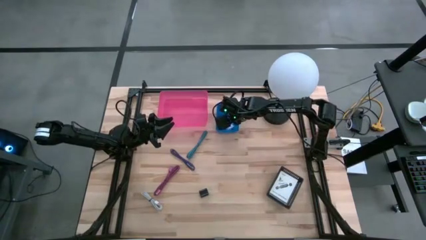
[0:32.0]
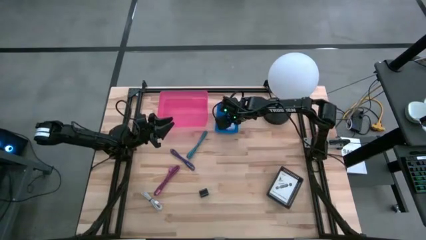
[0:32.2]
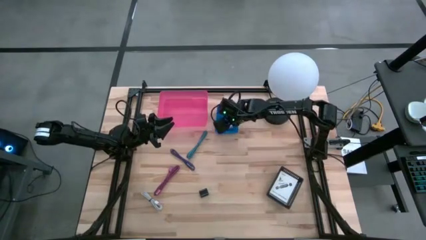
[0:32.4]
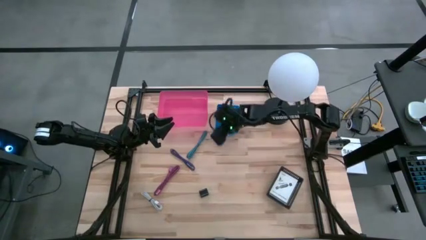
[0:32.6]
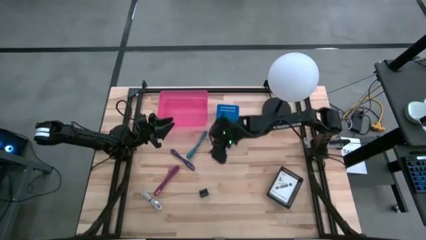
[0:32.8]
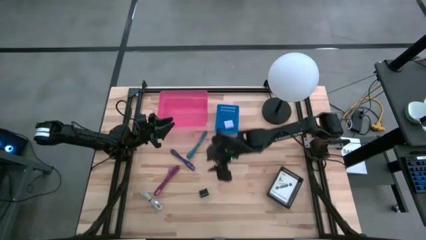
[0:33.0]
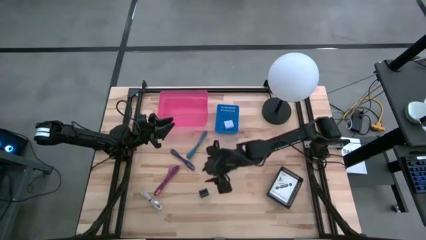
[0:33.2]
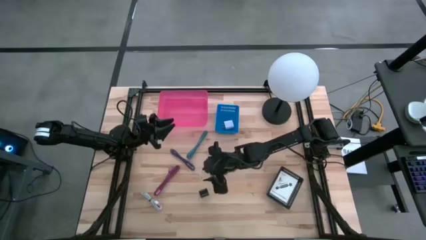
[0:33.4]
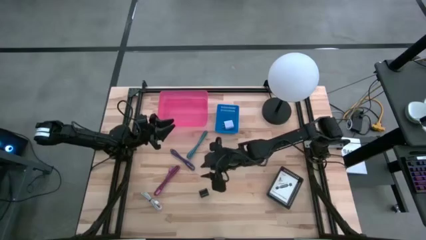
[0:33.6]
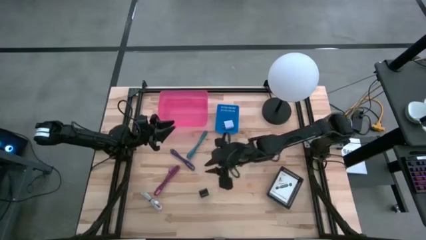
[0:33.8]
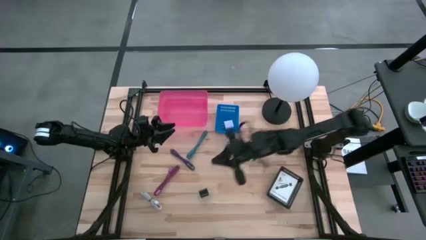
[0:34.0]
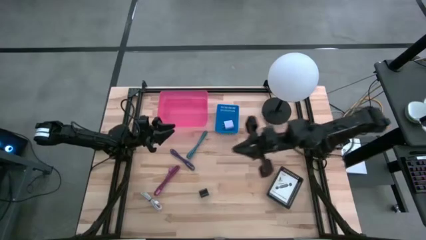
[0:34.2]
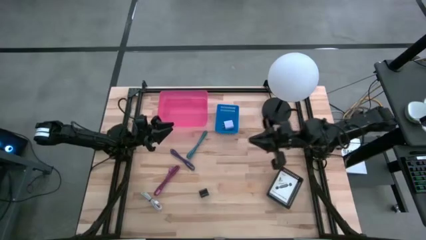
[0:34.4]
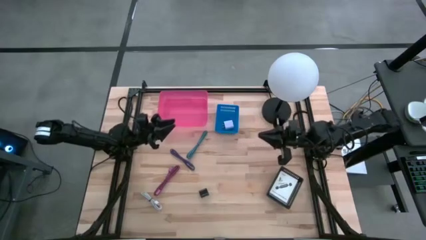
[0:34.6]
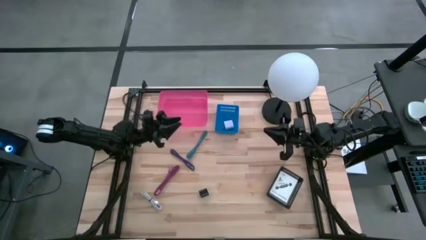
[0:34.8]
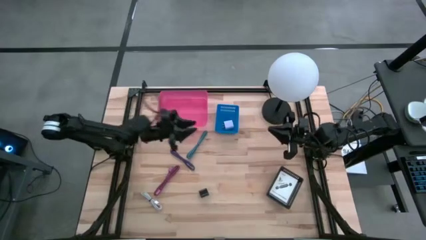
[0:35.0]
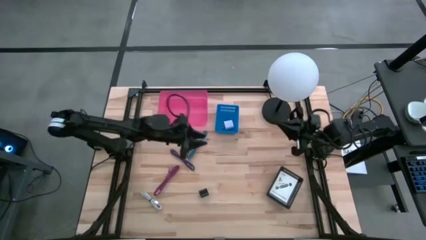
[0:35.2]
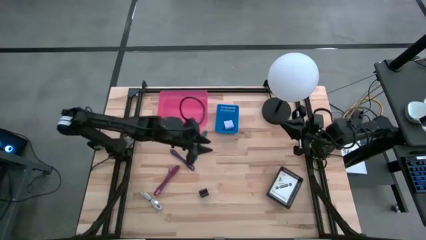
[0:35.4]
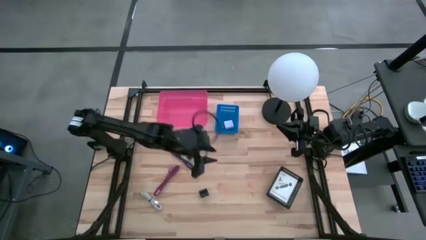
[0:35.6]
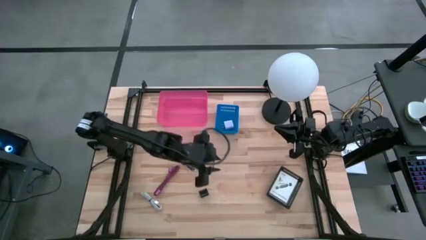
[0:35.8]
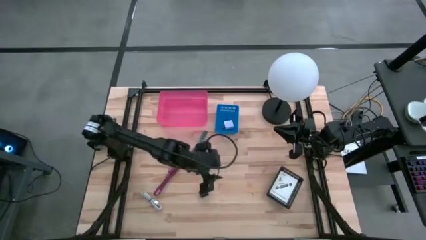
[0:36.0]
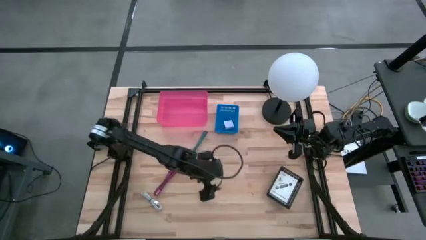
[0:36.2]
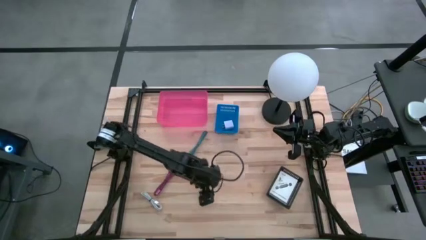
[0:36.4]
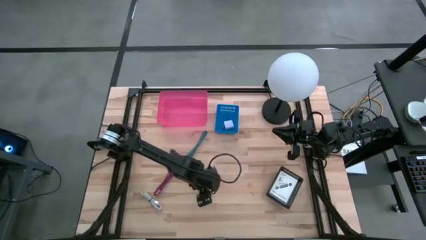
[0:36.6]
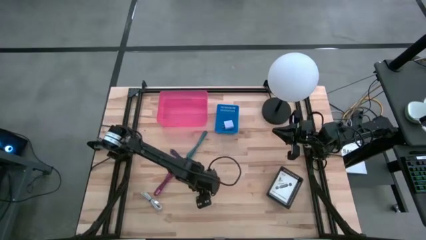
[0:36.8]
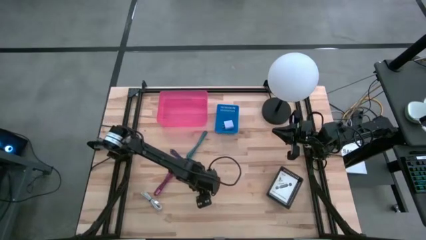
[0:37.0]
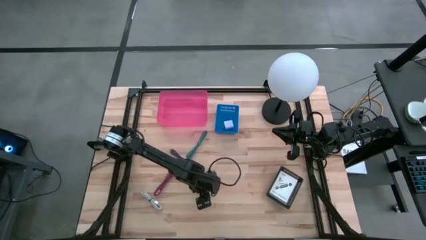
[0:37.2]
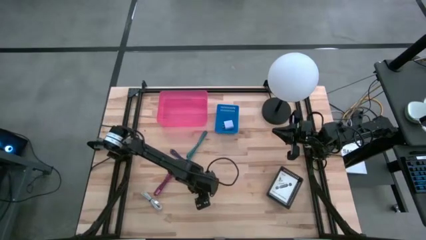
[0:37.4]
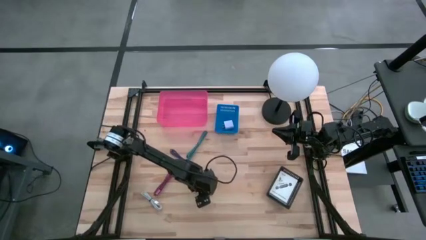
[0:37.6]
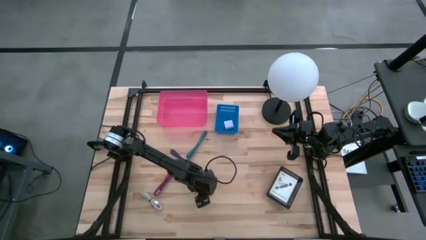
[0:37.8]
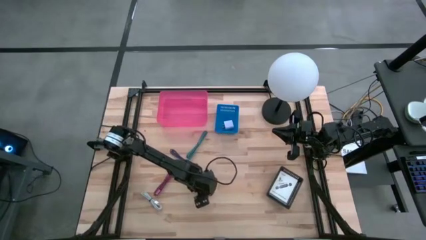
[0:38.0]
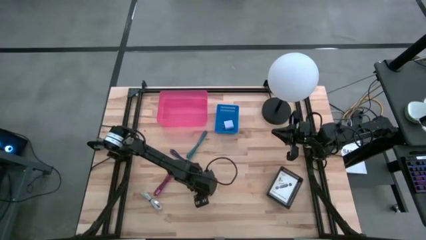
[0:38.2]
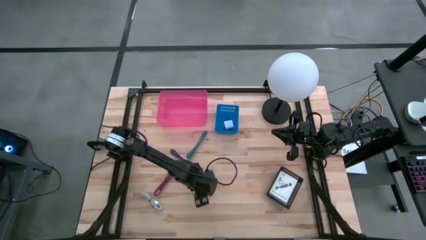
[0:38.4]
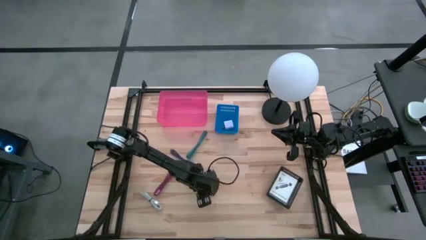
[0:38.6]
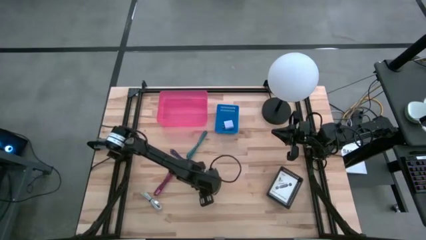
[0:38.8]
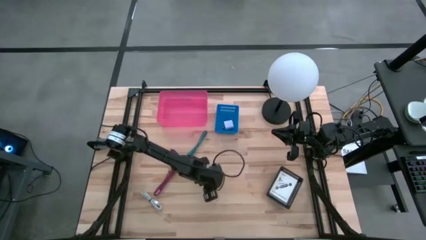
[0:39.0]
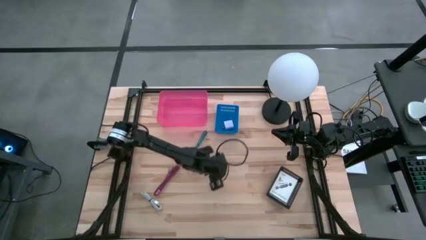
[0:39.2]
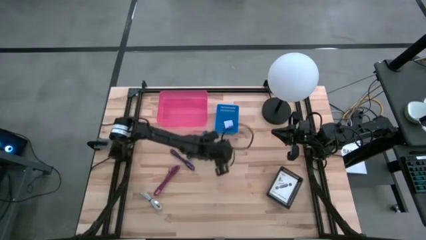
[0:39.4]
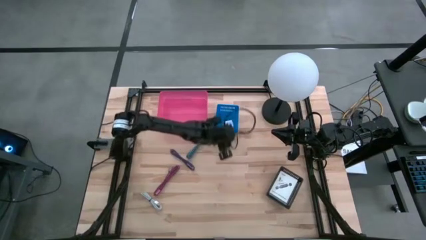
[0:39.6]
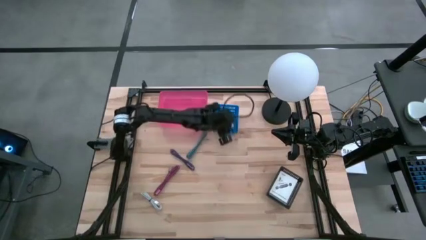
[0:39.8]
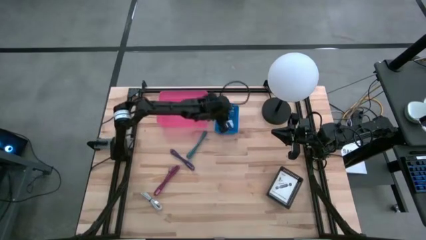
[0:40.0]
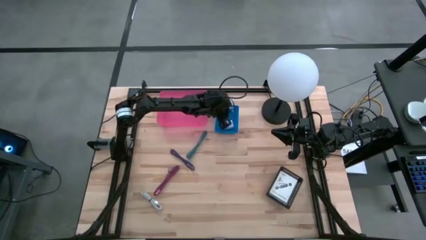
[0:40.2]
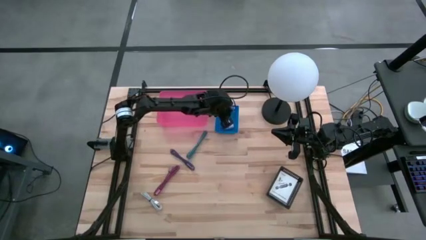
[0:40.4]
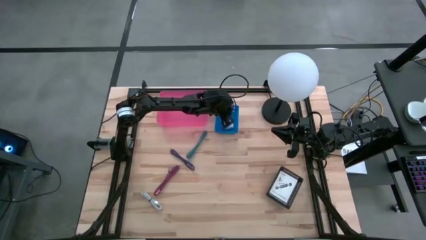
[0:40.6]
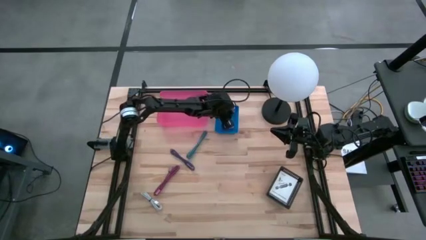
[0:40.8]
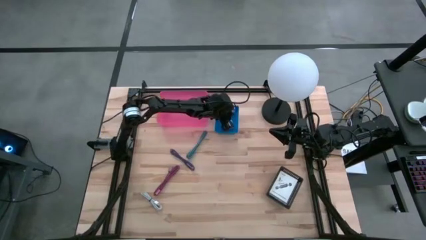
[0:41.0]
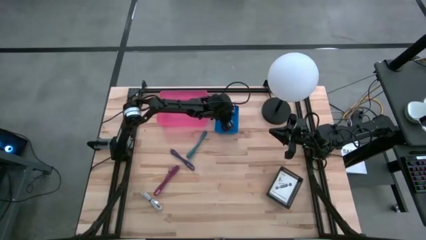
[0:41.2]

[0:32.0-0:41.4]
Task: Pick and place items into bin
Put the black charger adapter into the blue bin

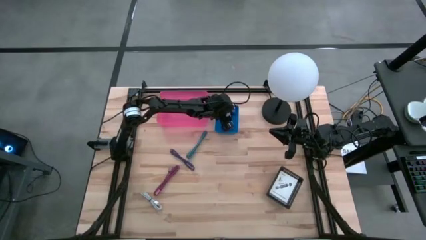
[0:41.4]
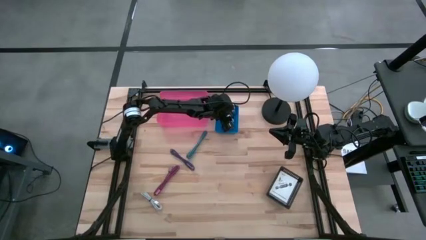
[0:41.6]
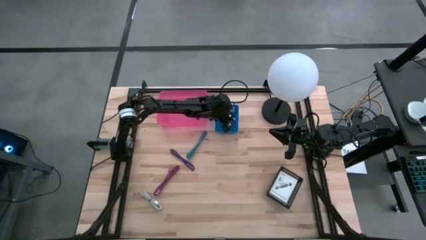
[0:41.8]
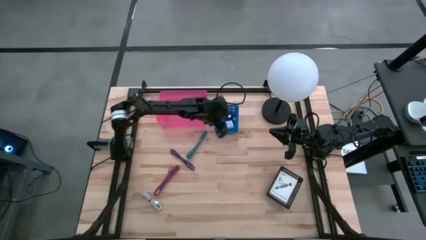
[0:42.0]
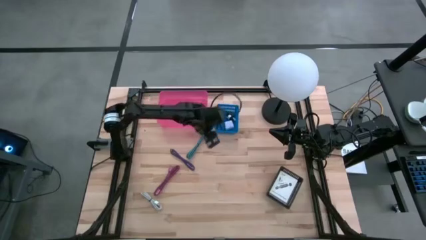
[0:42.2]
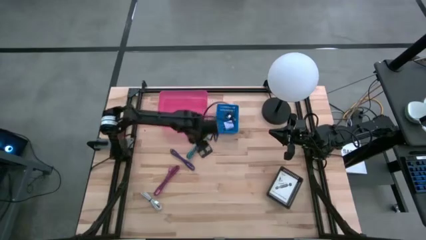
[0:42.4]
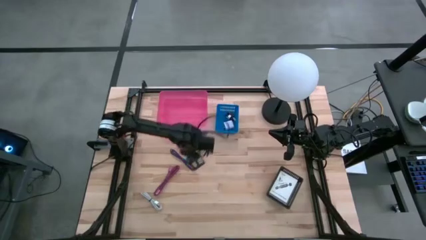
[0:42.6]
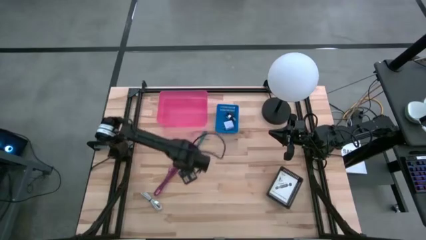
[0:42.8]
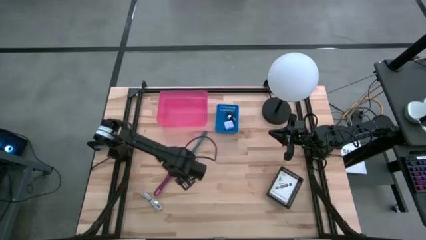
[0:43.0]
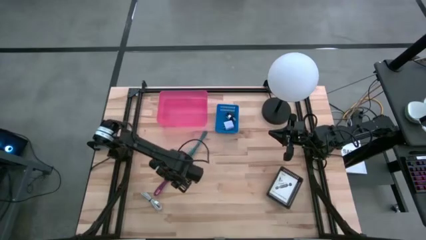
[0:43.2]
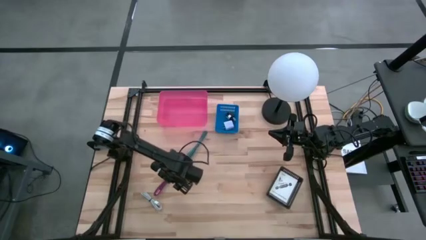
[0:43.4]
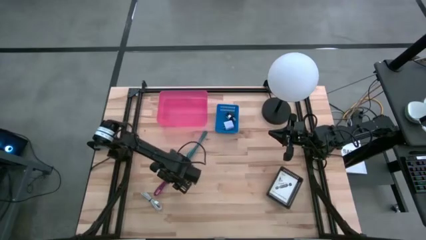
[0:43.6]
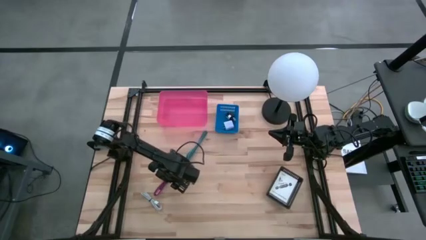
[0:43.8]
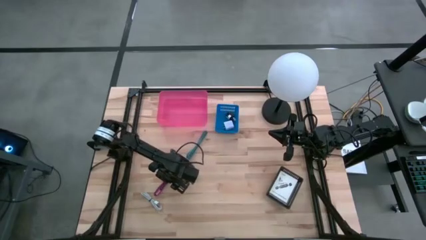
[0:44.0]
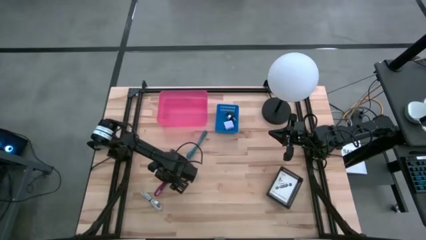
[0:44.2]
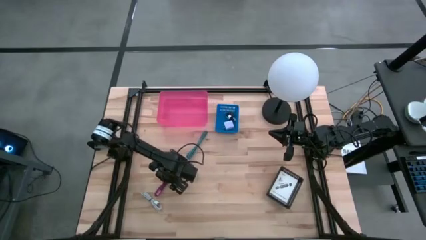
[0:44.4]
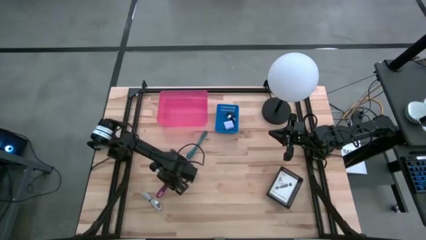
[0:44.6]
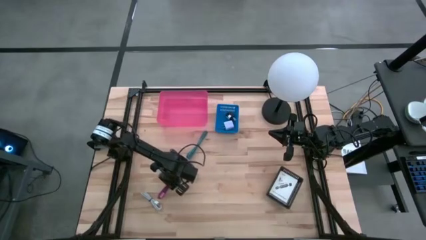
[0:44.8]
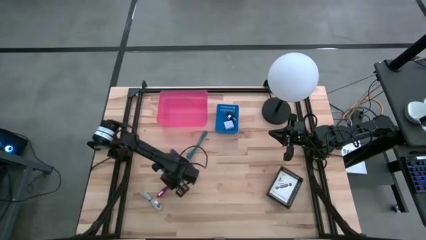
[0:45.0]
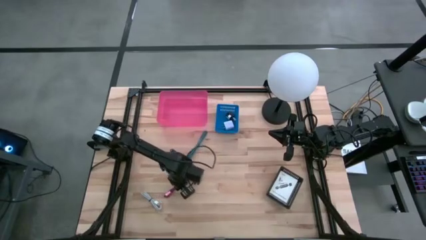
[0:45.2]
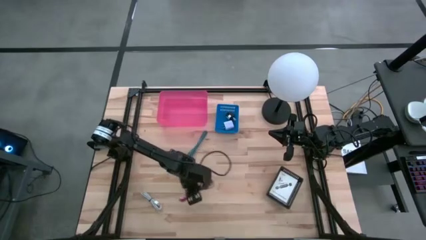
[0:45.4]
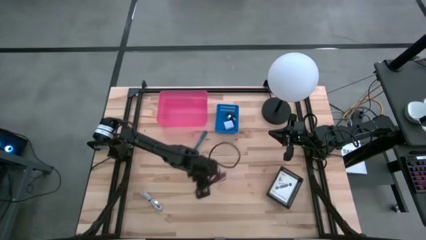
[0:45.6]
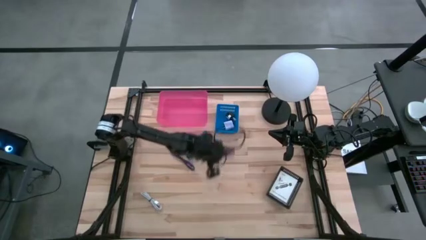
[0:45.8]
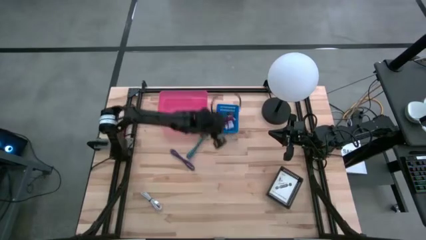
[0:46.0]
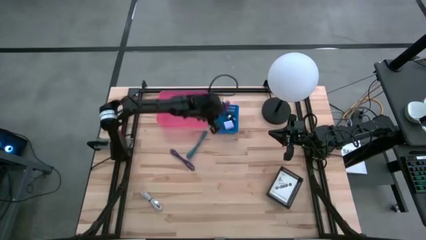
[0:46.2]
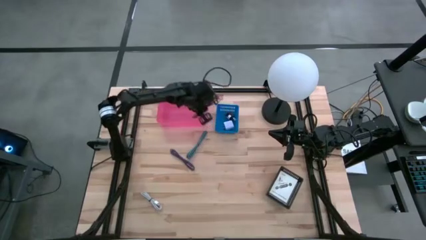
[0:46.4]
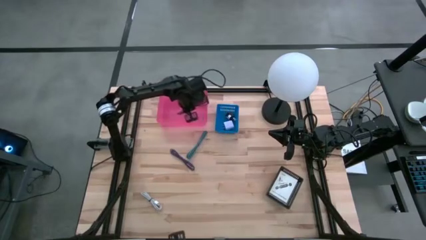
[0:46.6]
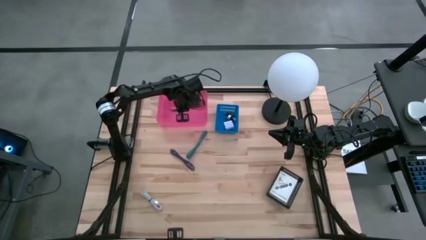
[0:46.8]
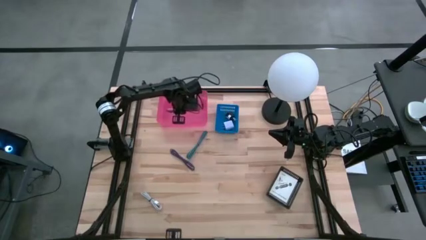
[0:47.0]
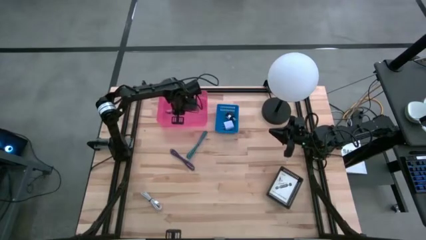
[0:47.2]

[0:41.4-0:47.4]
Put the pink charger cable into the pink bin

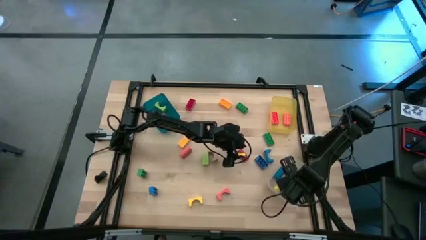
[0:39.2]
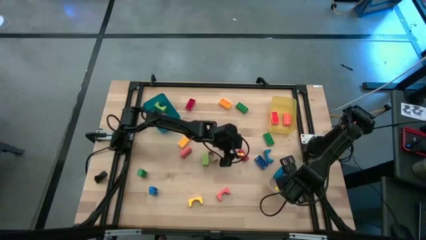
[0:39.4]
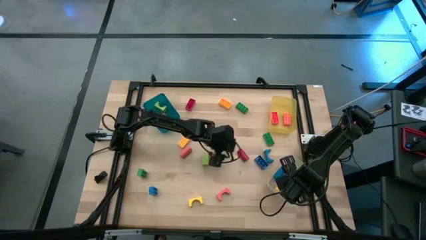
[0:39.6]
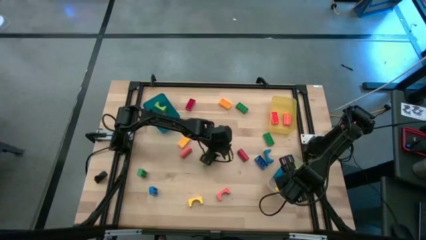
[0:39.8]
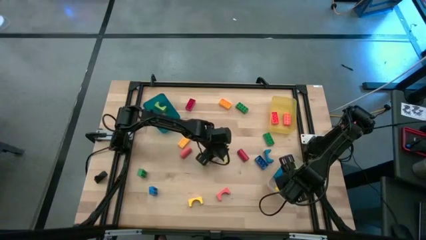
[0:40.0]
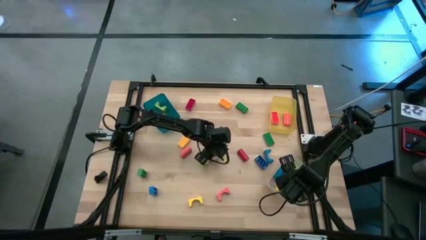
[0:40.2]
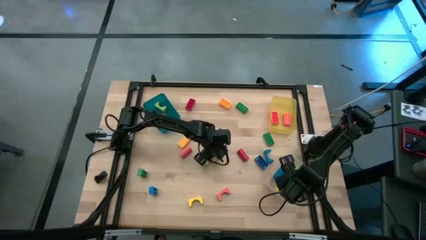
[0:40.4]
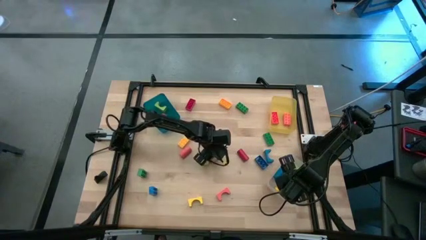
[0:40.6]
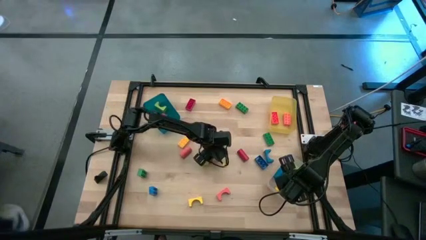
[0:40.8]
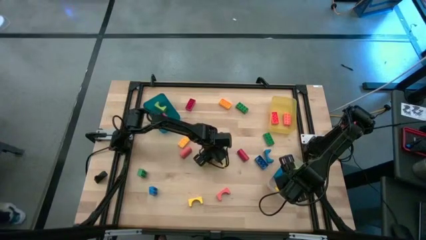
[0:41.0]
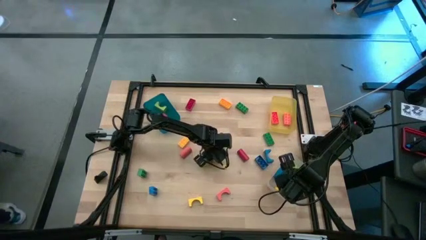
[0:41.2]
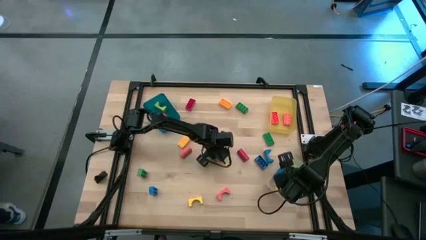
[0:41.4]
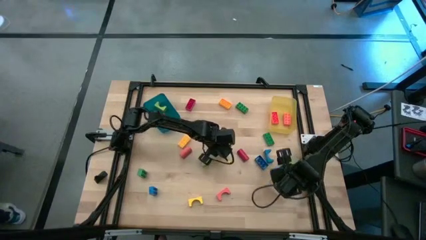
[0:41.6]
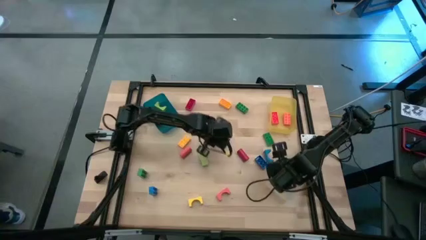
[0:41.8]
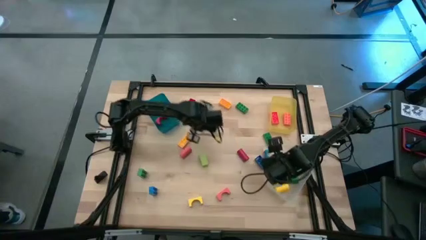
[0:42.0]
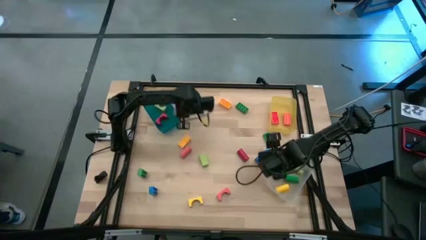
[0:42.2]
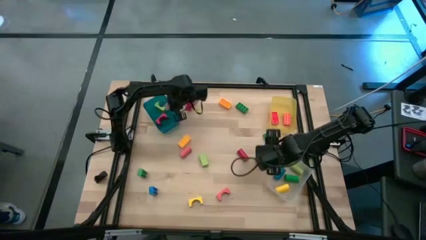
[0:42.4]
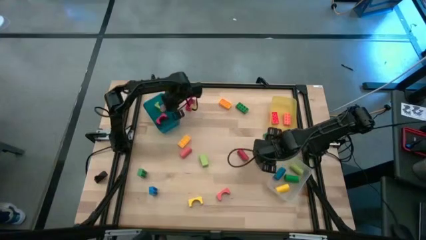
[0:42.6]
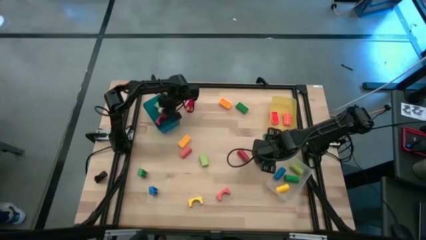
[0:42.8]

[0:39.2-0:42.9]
Task: Sort blocks by size
Put the brown arch block into the blue bin
